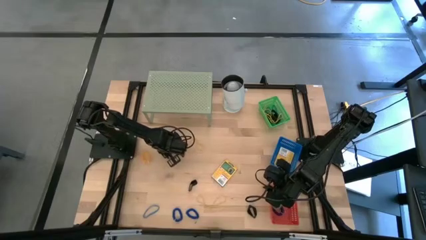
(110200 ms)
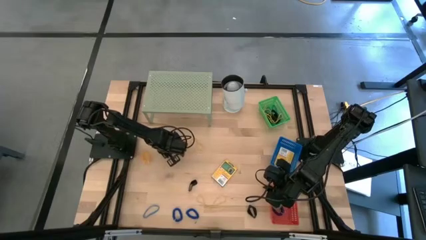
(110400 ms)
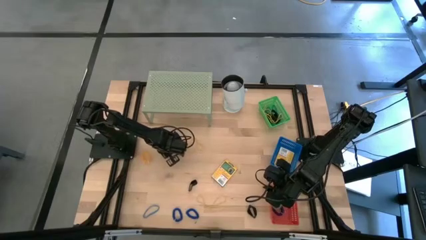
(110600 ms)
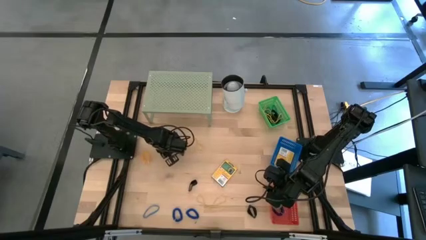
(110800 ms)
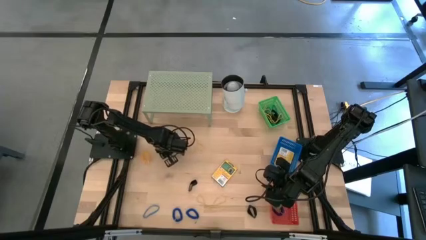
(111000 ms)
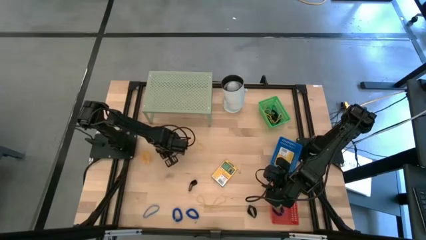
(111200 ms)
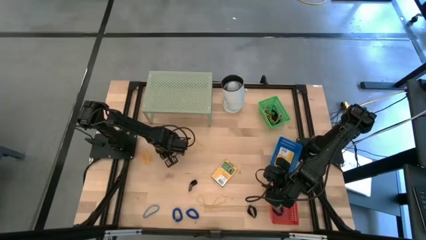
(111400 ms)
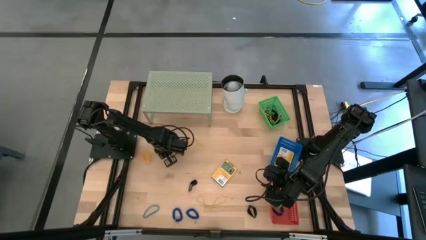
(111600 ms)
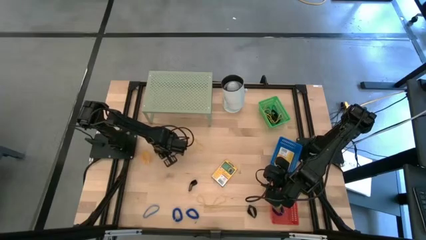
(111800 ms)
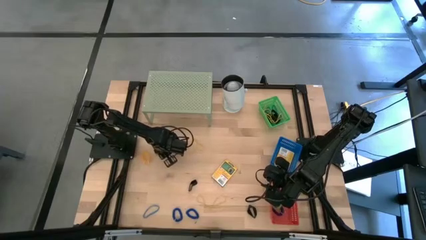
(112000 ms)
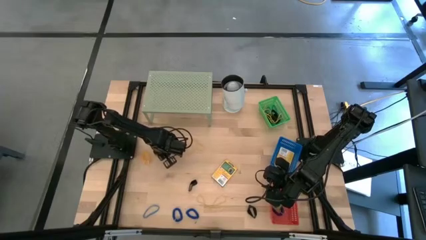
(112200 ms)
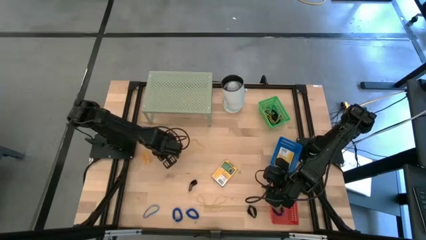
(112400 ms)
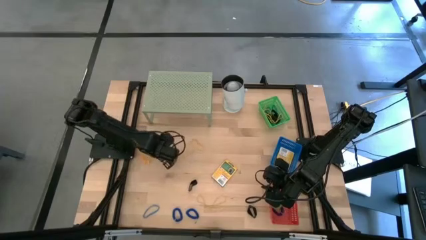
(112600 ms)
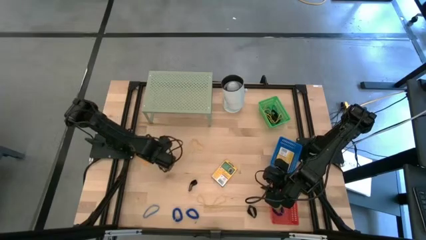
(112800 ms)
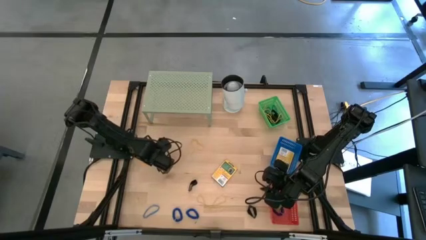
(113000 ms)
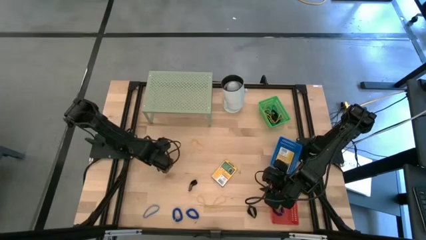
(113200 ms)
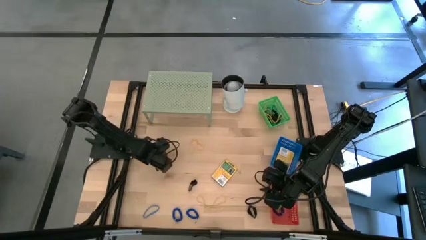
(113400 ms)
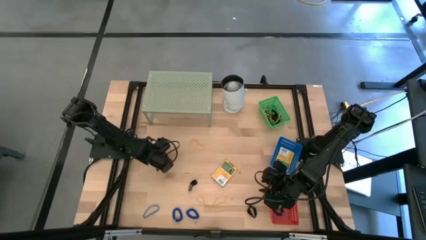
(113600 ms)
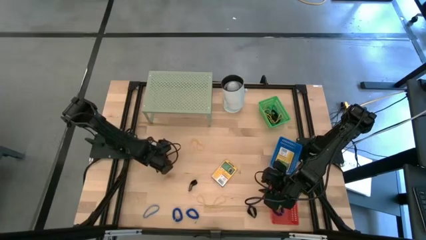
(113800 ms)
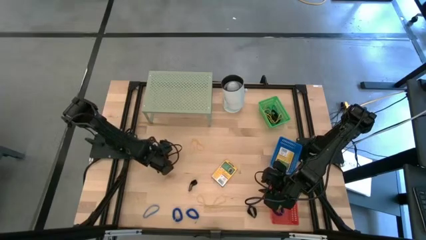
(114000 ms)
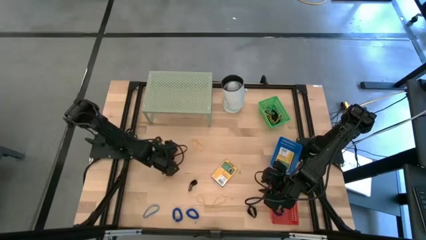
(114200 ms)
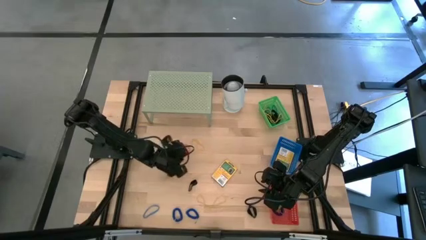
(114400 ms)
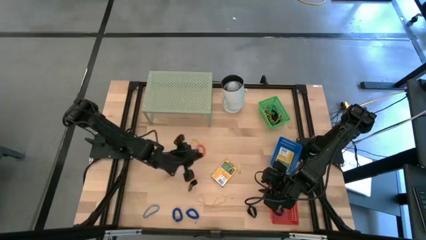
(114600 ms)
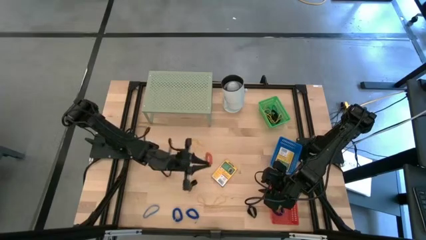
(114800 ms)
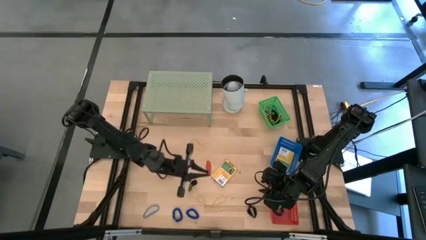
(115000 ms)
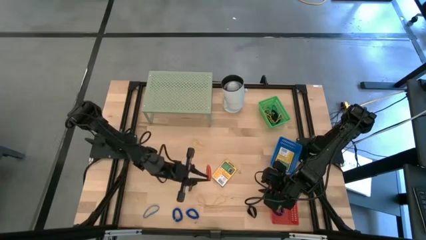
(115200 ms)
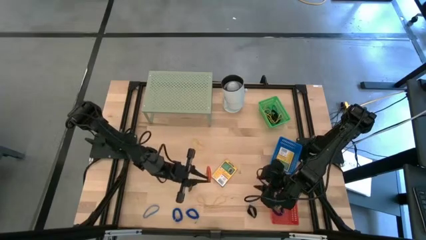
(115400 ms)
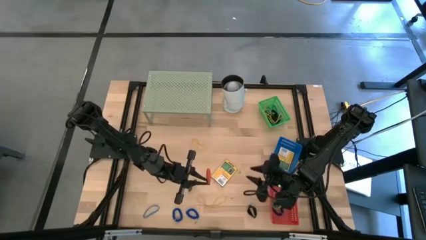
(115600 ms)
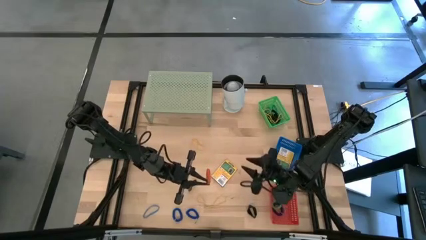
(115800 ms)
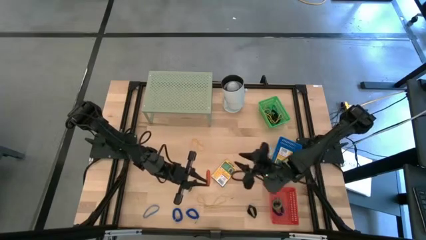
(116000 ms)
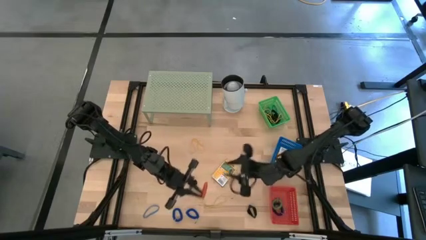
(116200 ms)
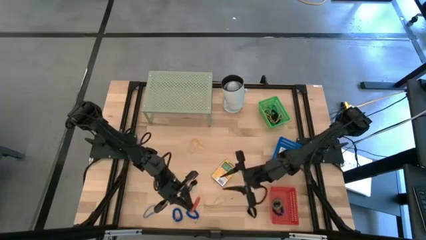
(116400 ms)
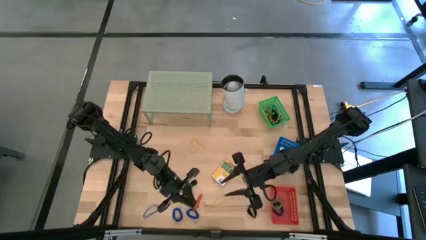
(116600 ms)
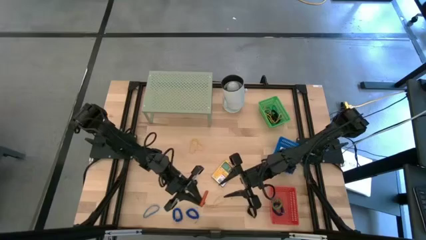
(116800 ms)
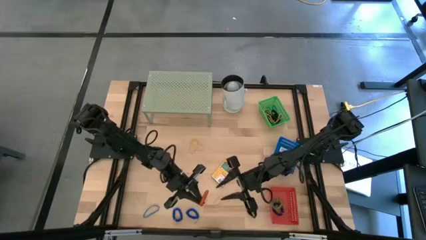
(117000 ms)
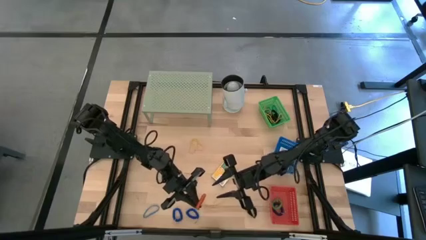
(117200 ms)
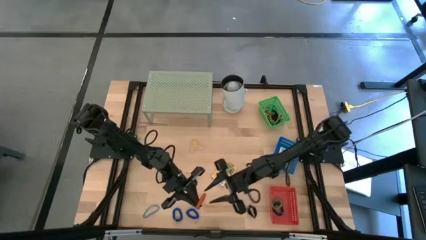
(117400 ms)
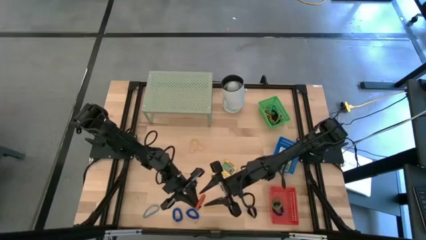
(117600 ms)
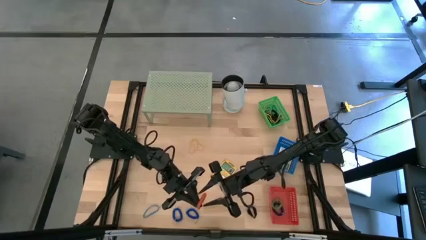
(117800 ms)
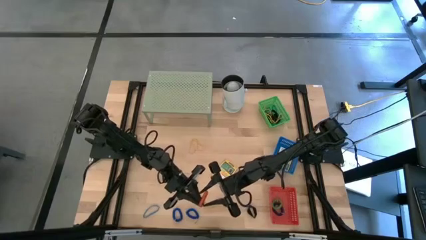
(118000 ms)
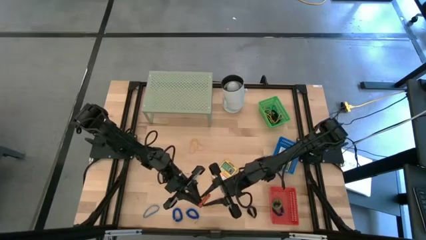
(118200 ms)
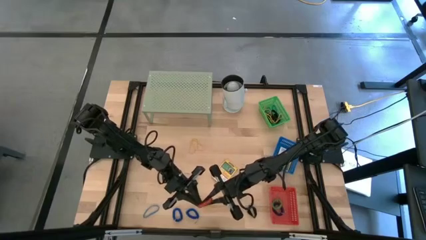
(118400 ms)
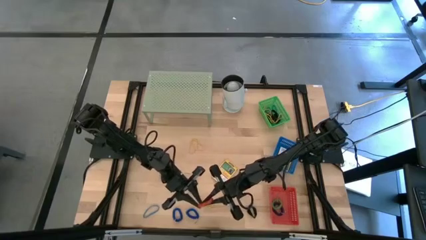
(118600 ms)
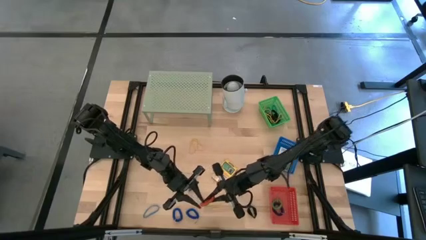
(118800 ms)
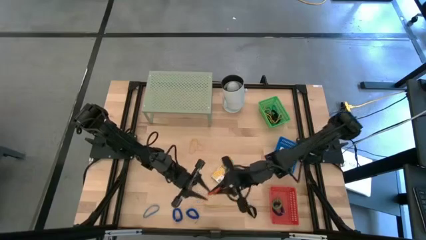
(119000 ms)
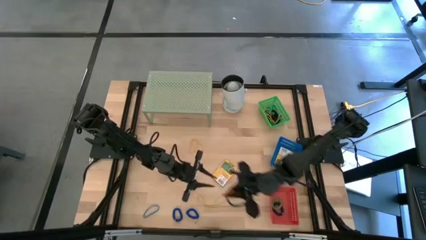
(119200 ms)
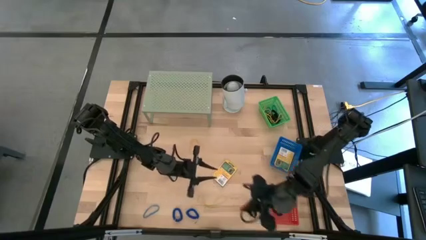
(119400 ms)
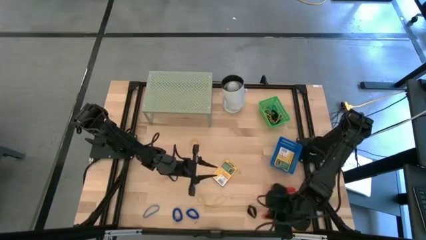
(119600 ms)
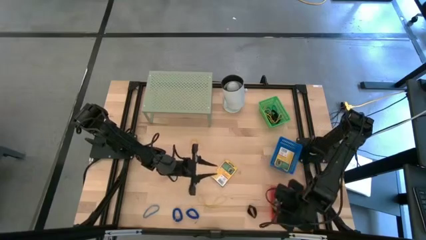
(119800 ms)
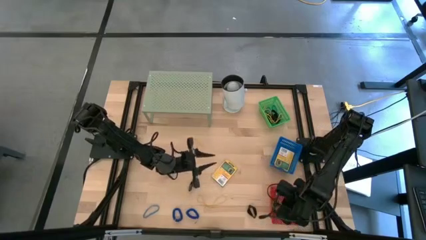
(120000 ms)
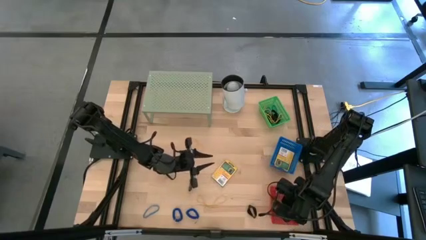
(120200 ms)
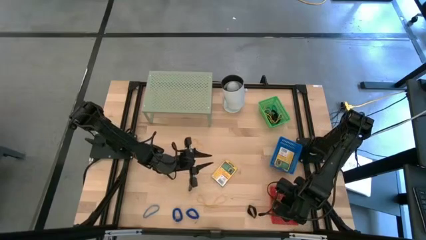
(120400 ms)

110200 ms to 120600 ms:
Task: Pick & Place Office Desk Supplies
Put the orange spiral keychain into the red bin

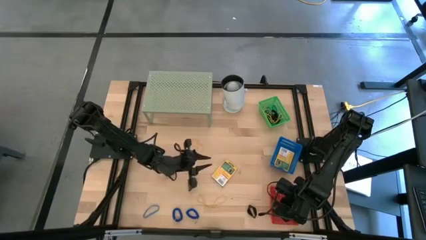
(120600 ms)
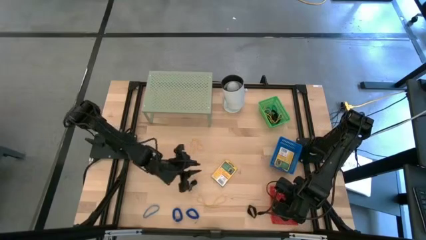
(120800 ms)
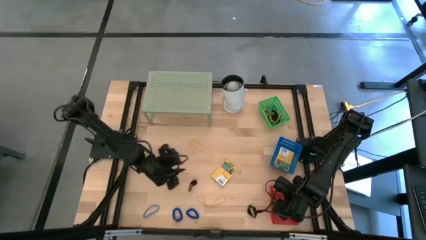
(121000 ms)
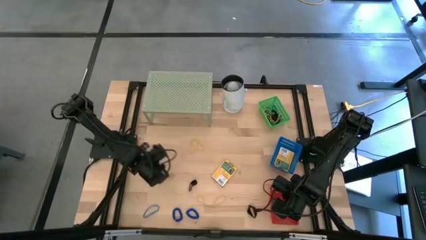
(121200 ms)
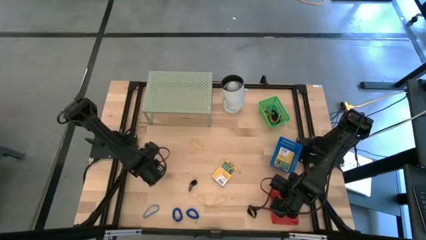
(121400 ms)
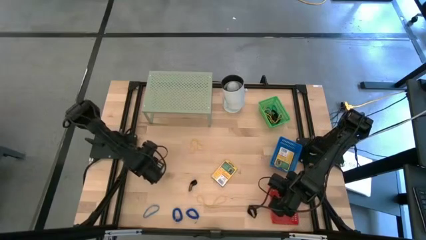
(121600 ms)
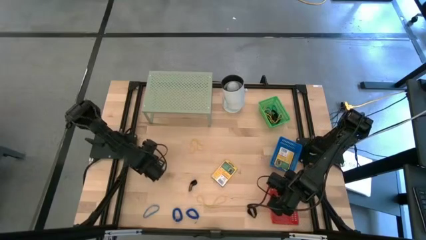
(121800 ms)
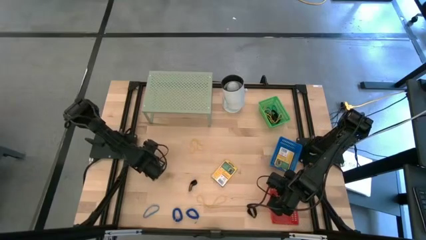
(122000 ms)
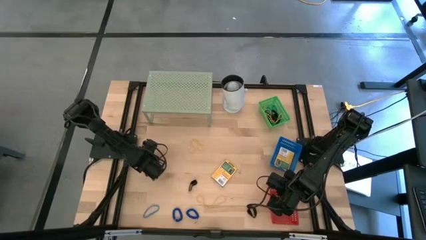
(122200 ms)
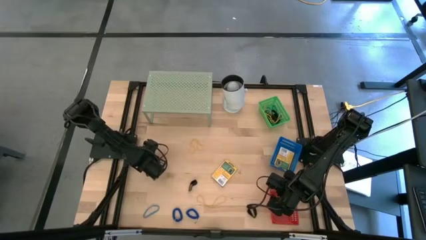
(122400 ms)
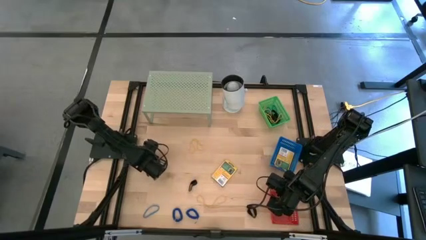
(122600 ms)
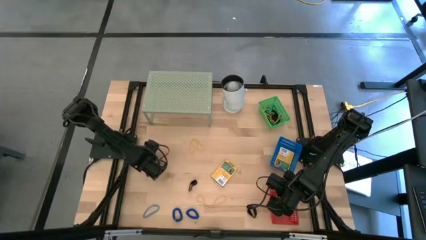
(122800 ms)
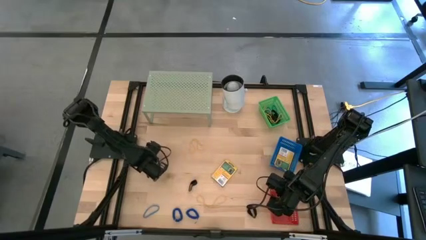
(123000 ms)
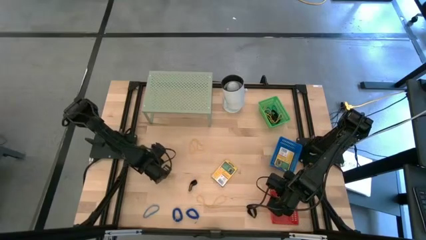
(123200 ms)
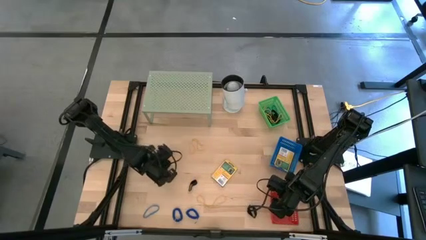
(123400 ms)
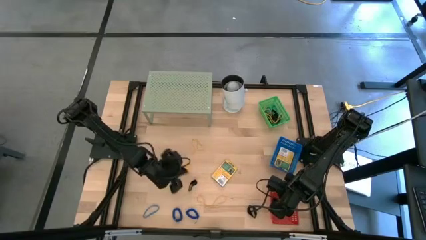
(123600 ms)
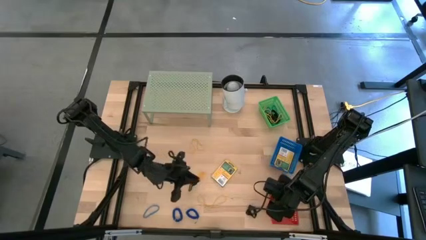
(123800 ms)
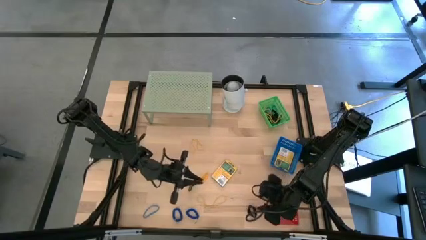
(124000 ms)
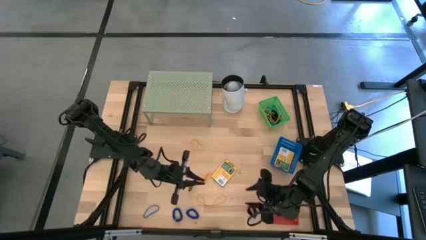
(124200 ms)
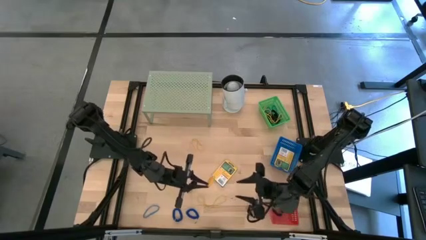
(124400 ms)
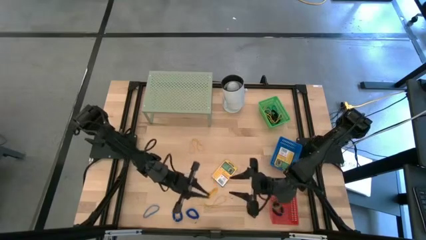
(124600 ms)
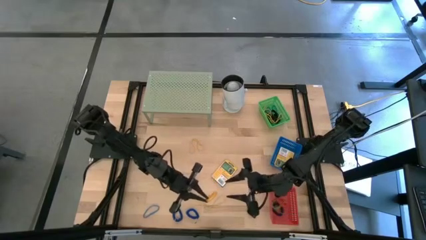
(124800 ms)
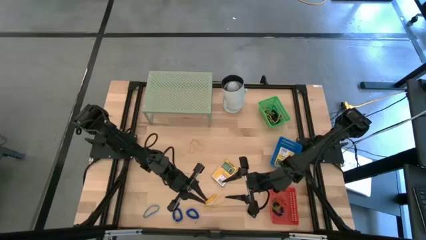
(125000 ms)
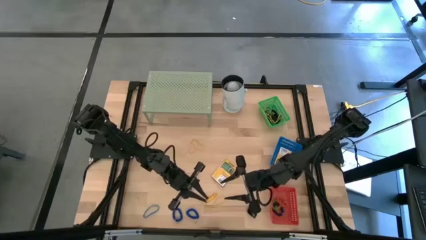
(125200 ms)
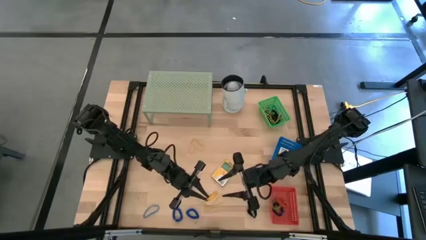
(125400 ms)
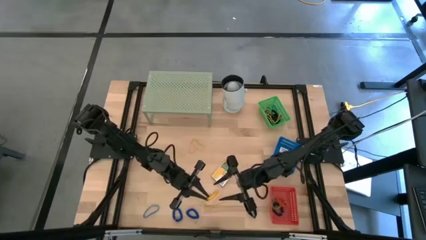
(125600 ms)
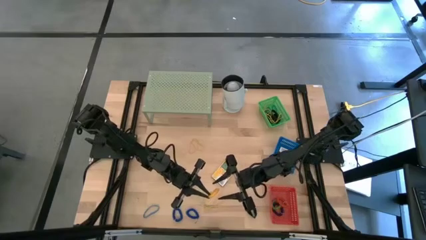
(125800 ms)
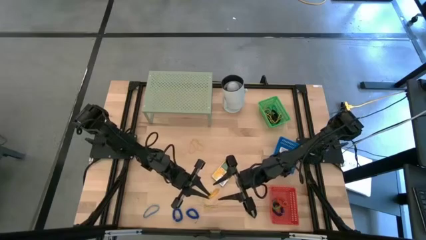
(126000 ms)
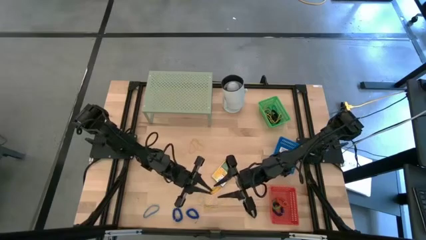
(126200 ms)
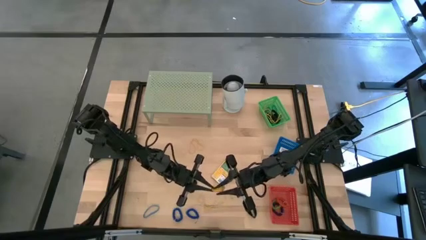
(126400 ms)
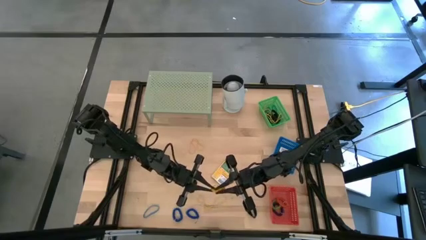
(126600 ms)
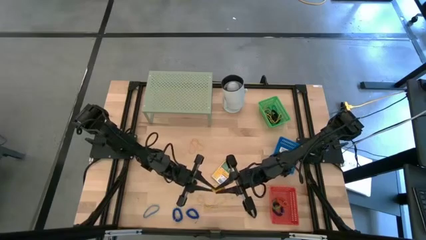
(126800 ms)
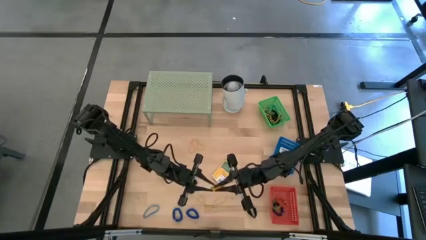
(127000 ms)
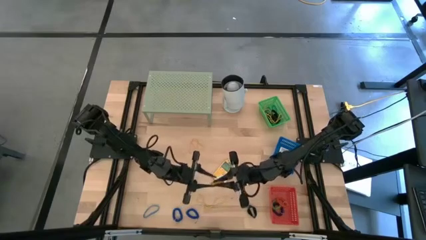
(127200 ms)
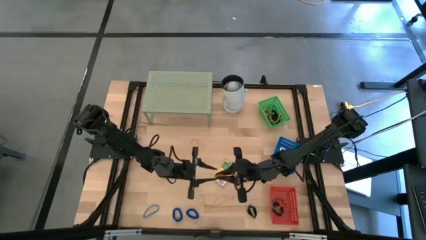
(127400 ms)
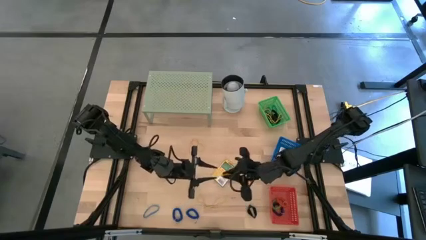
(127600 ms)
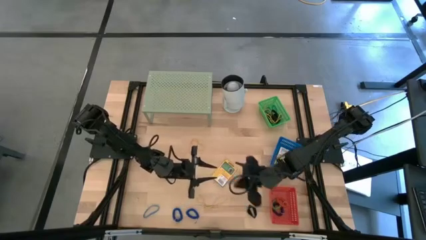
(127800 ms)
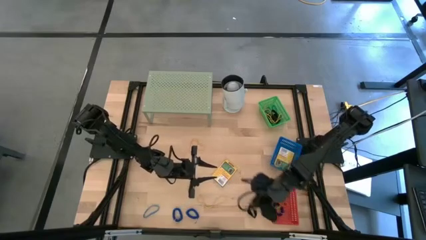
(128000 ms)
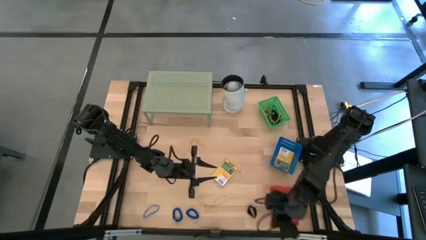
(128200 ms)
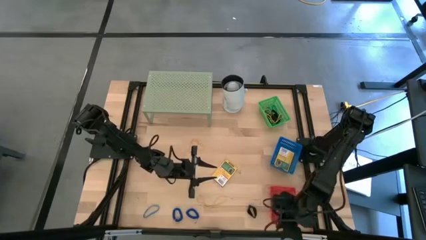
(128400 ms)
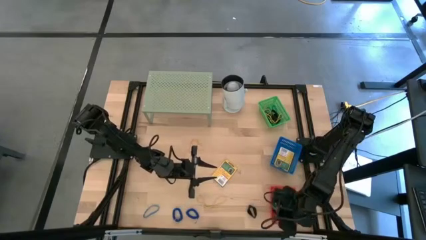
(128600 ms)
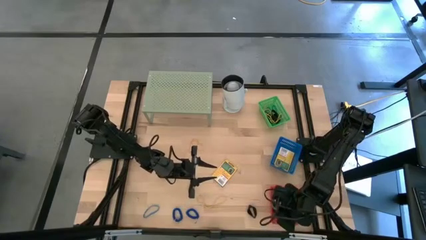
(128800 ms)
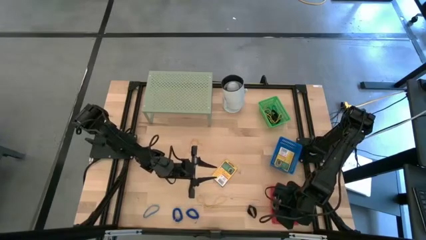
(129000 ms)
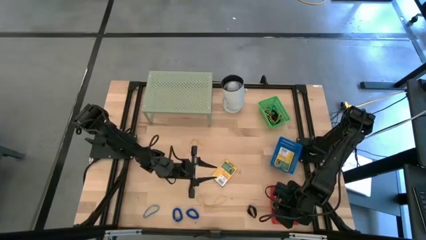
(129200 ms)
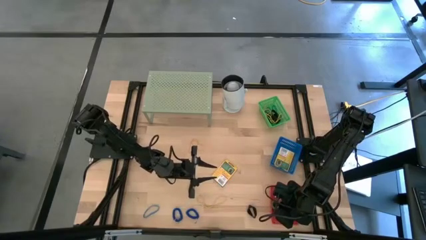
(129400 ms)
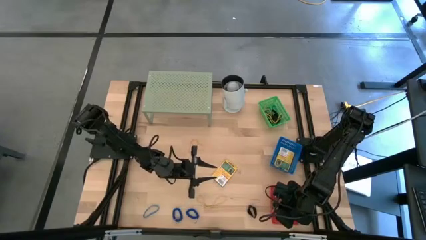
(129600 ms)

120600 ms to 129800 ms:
Put the yellow spiral keychain into the red bin
